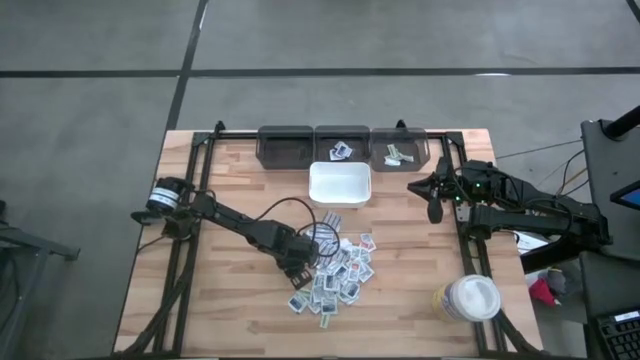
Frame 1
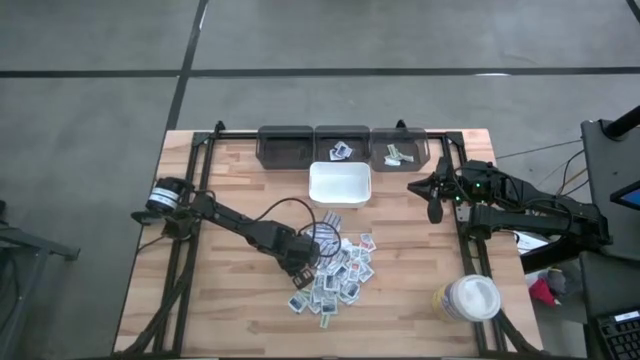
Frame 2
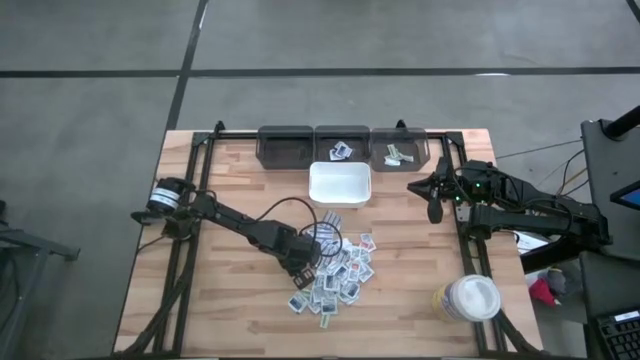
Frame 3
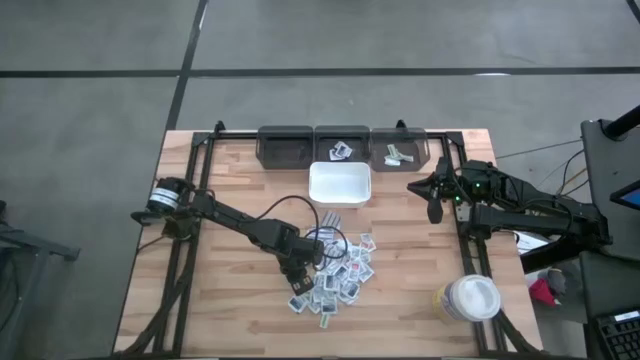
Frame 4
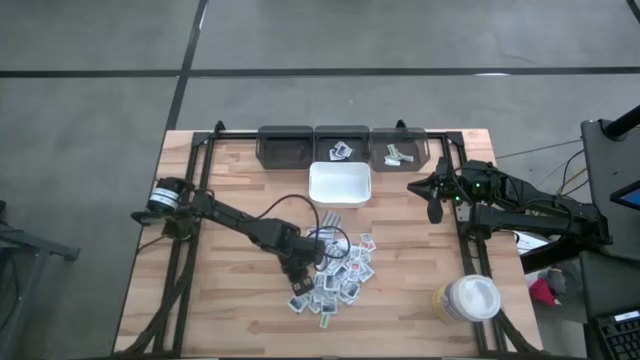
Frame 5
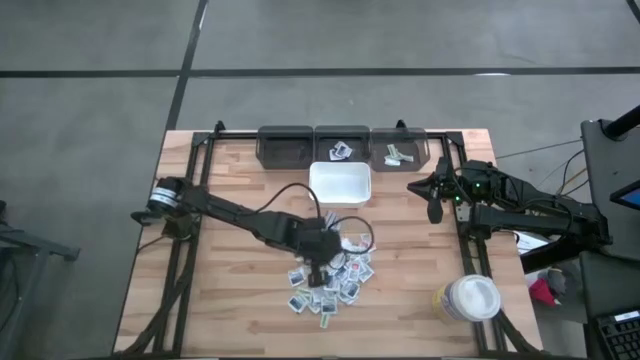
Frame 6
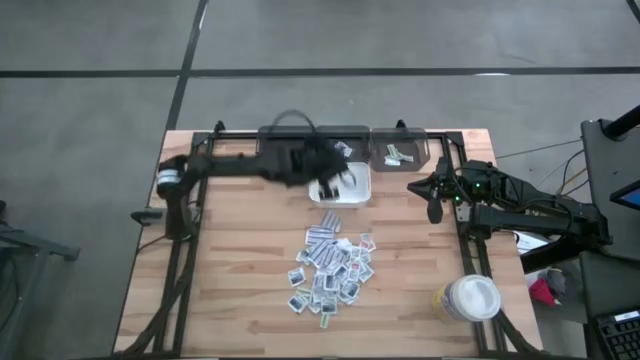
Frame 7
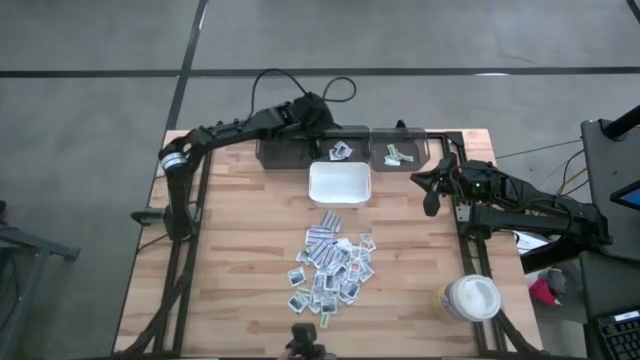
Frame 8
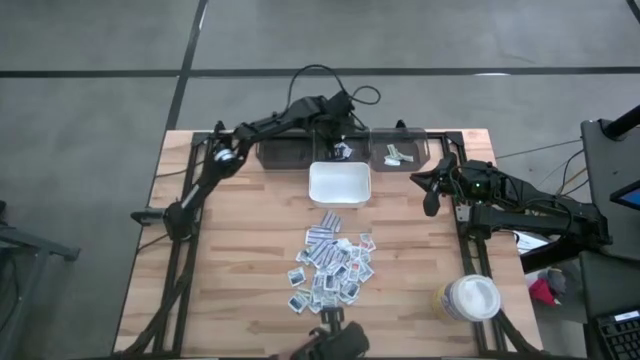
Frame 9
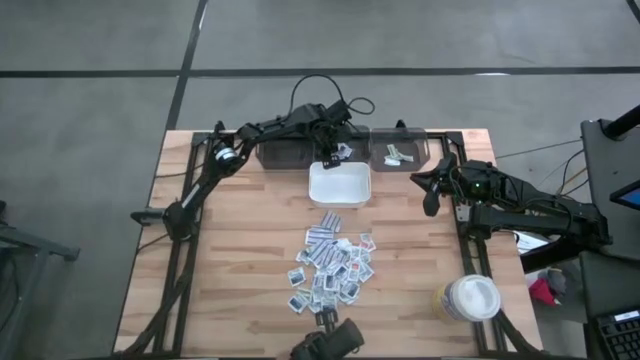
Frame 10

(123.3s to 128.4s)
Task: Pick & Place First Aid Supplies
Put the blue alcohol pad into the middle gray bin

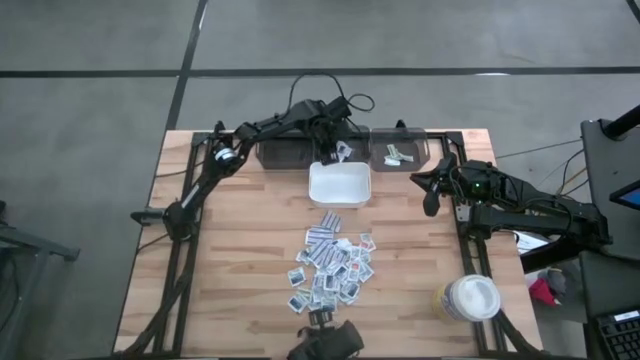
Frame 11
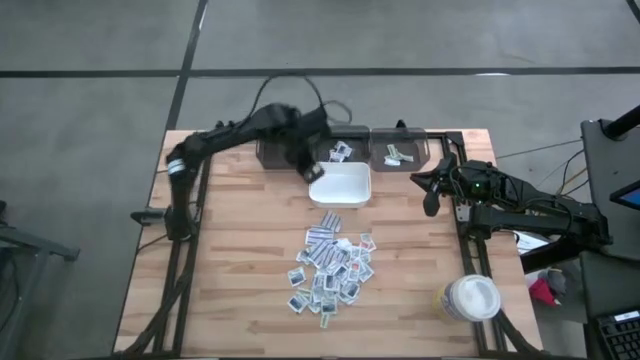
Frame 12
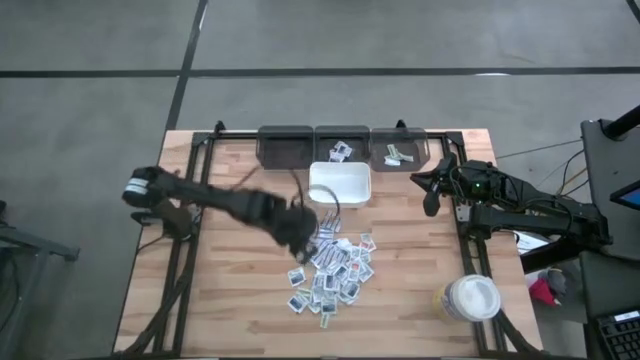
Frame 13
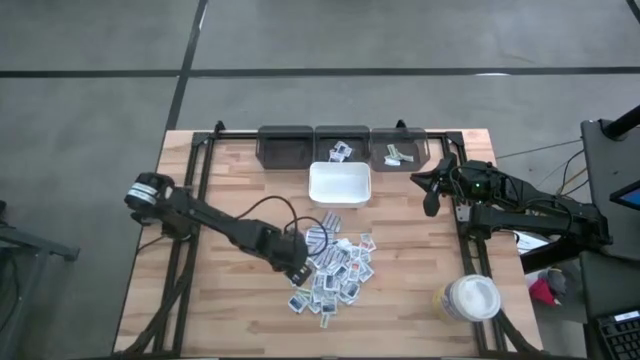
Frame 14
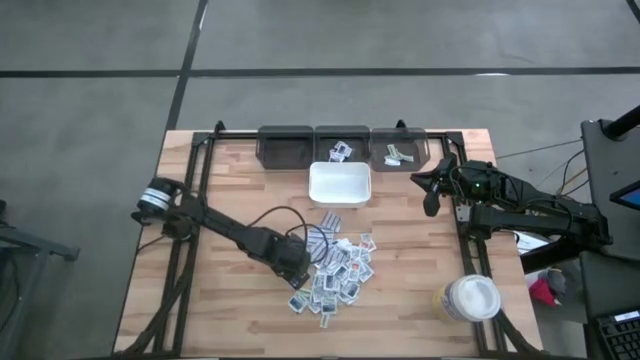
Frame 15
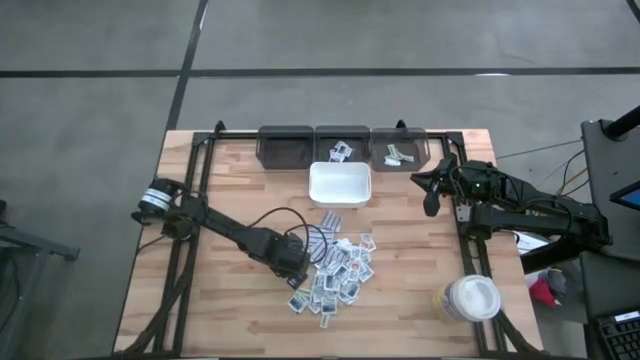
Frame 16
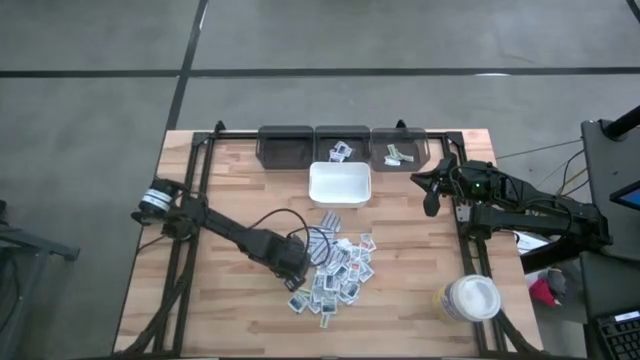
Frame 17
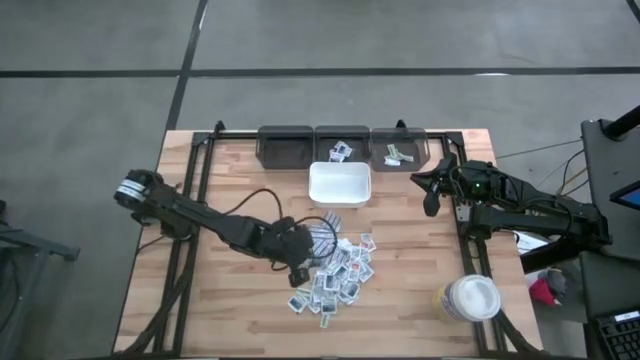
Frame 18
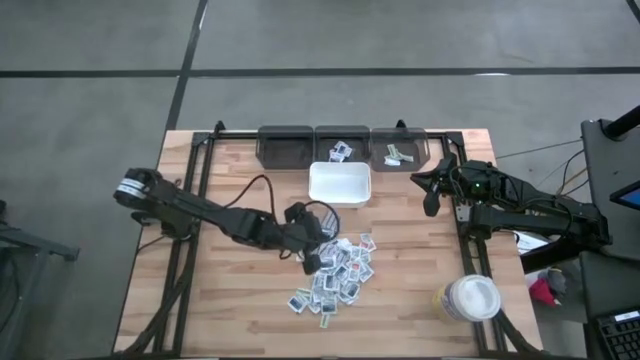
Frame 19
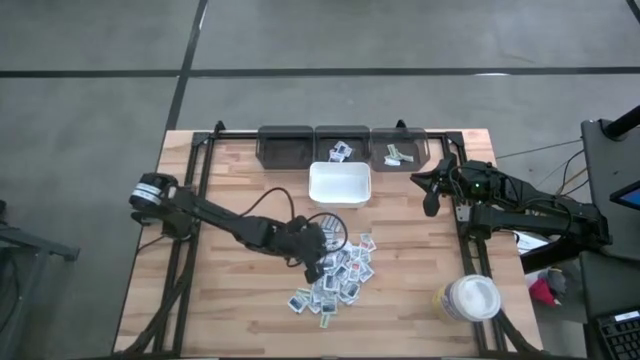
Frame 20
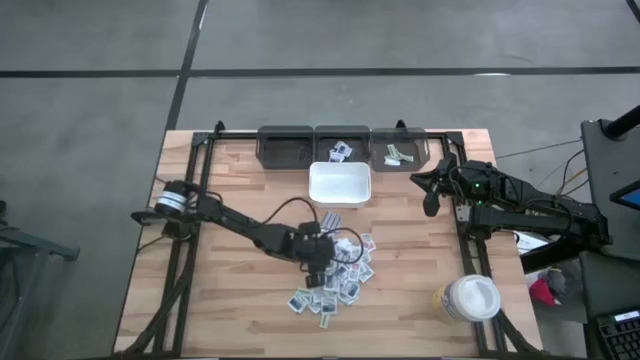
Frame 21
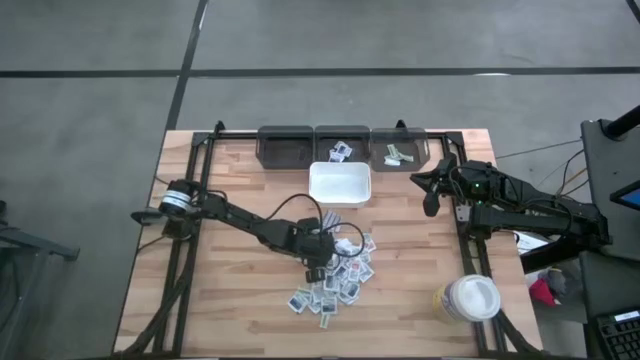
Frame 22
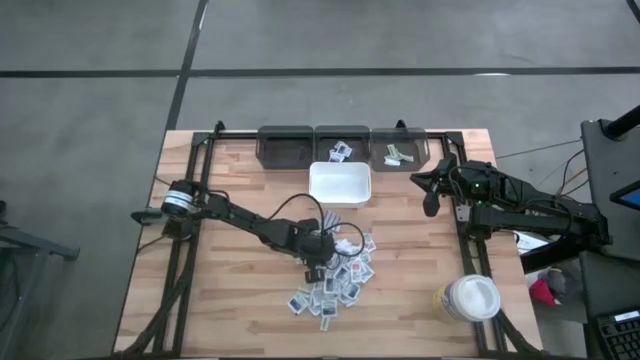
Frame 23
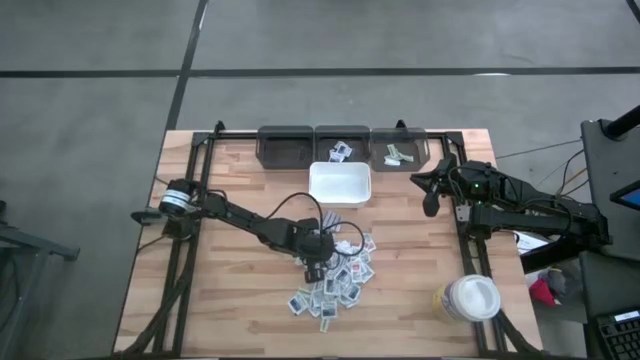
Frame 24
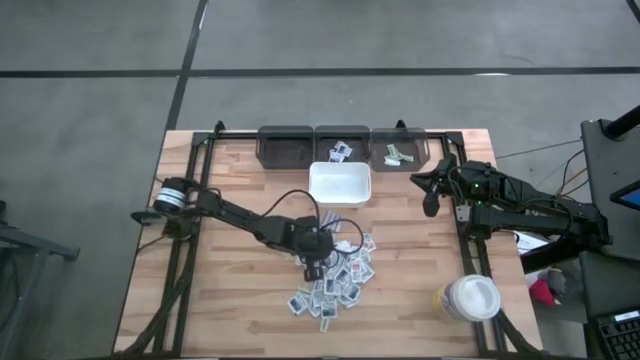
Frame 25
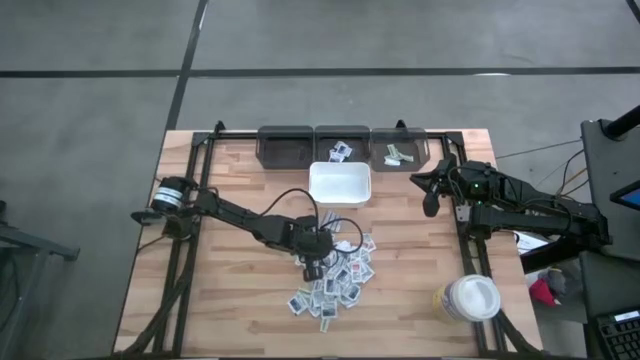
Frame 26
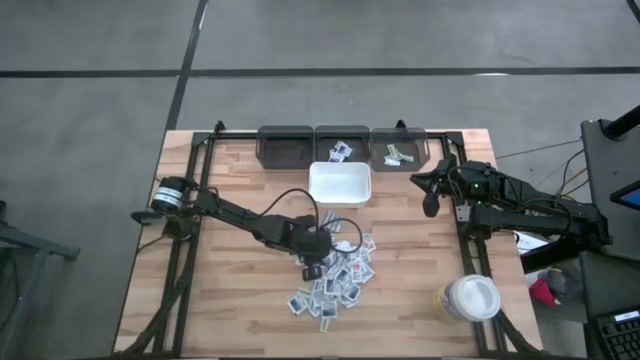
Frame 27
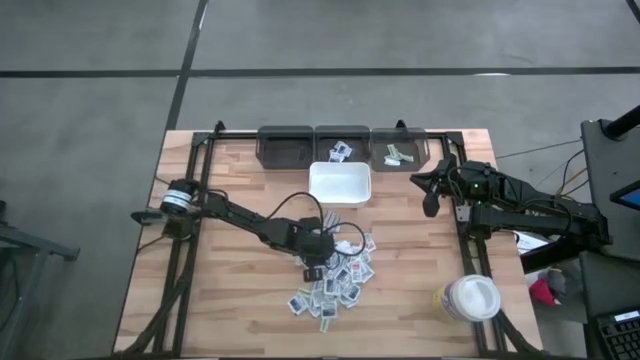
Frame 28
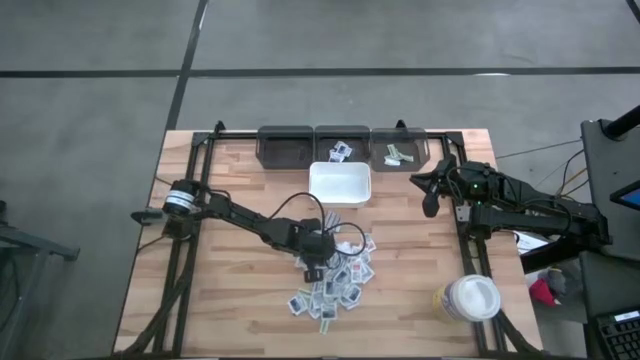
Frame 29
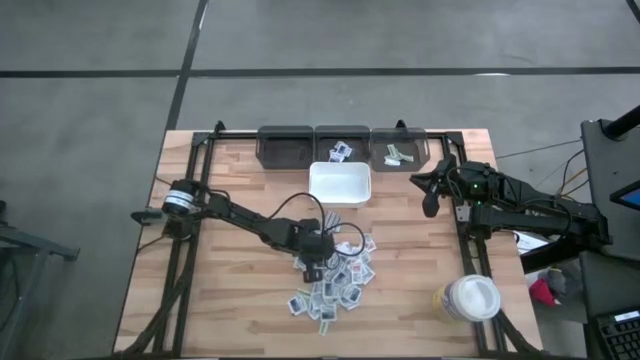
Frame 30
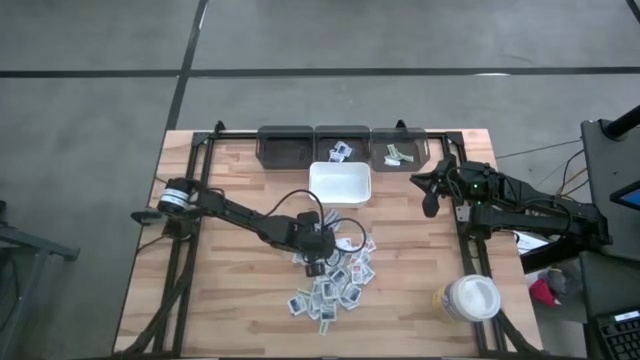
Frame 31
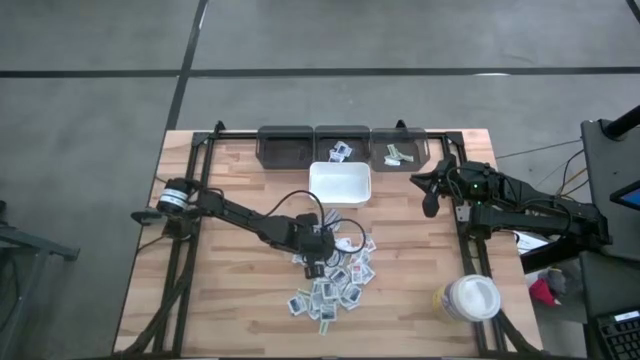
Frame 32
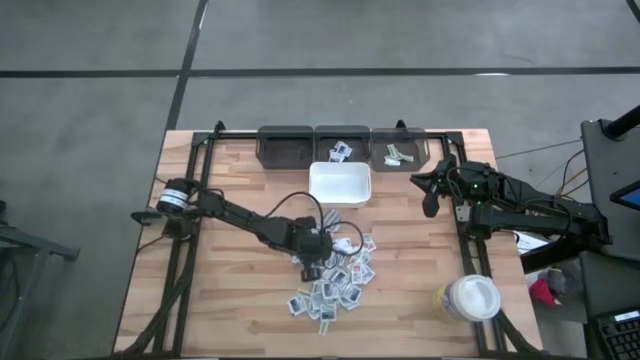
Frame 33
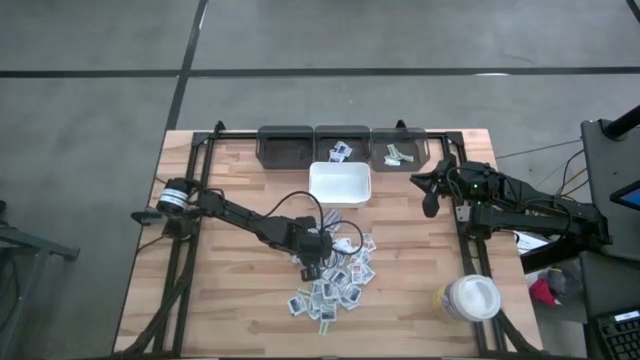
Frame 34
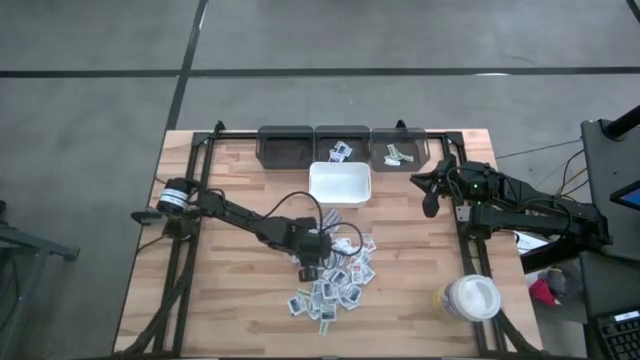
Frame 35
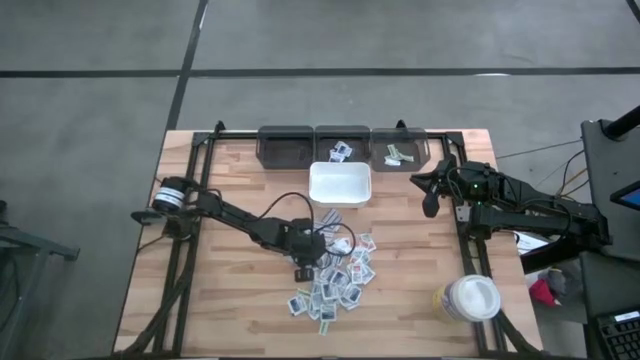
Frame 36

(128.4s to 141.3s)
Put the blue alcohol pad into the middle gray bin

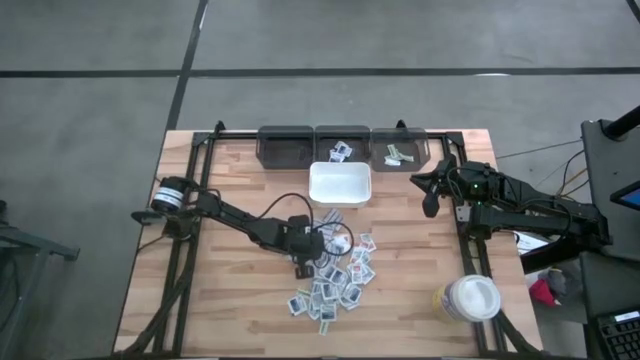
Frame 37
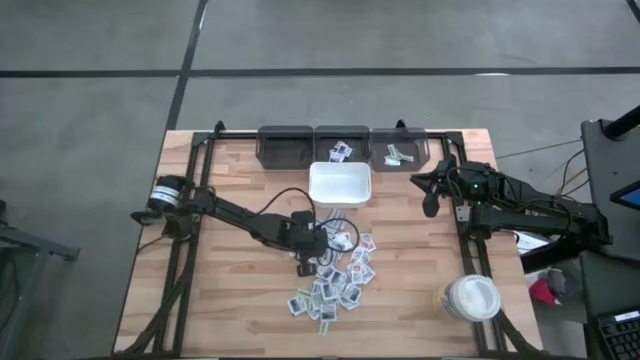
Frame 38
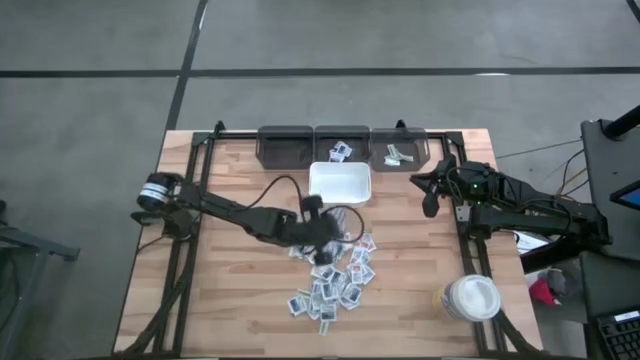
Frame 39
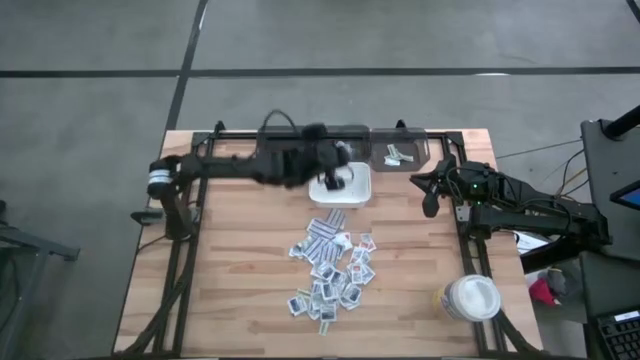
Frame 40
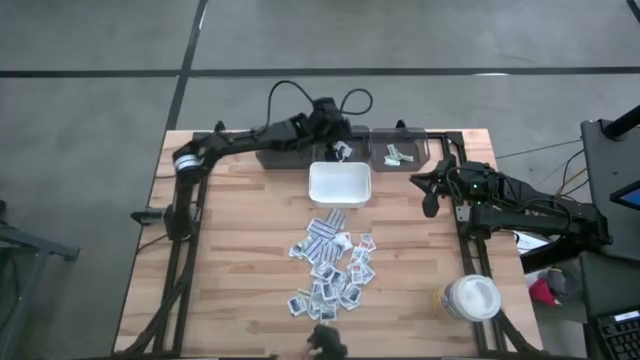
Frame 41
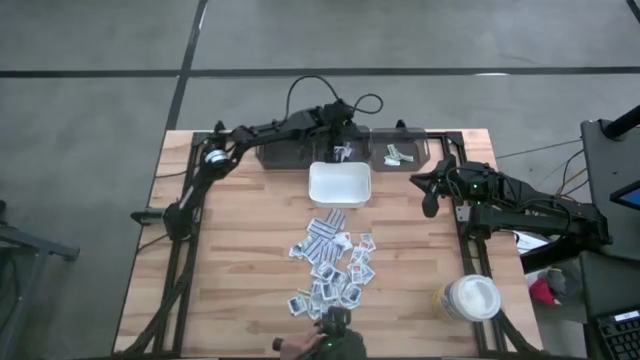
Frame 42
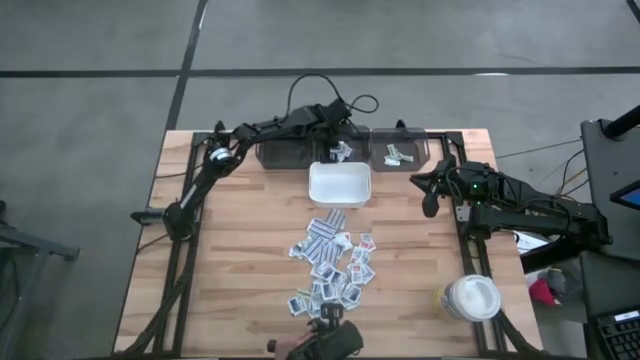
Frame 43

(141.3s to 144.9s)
Put the blue alcohol pad into the middle gray bin

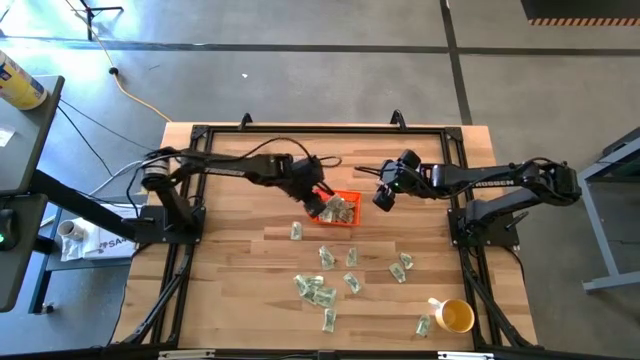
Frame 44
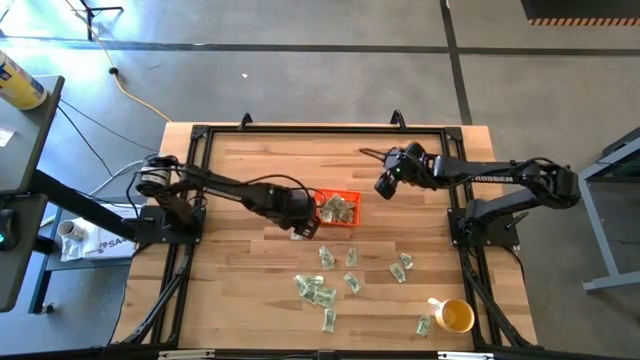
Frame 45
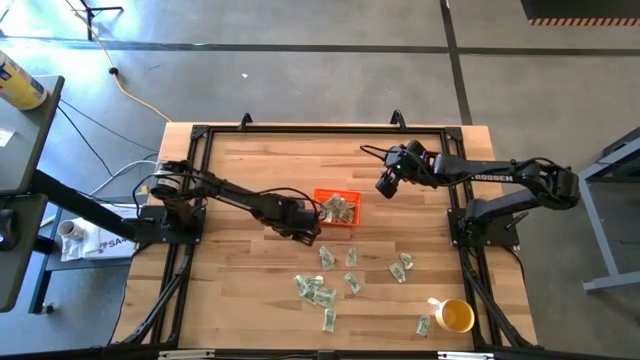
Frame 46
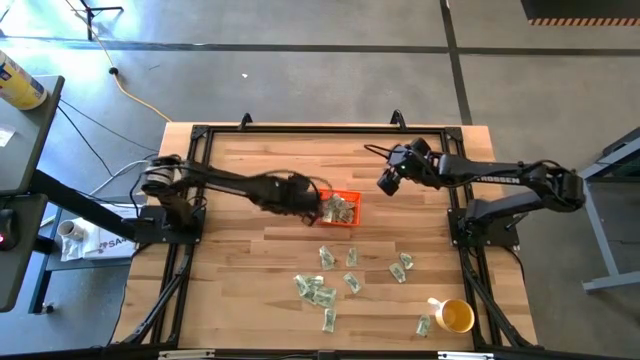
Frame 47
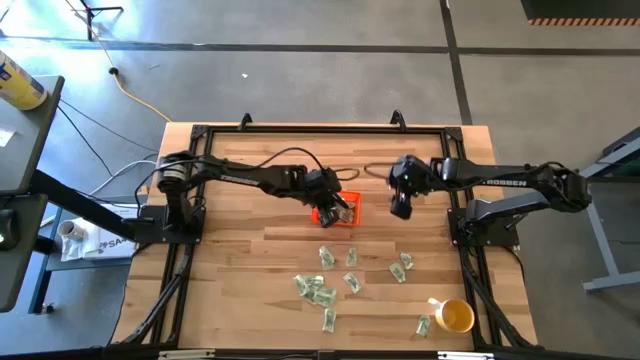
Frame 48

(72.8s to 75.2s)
Task: Pick and place Stevia / Truvia into bins
Put the stevia packet into the orange bin
